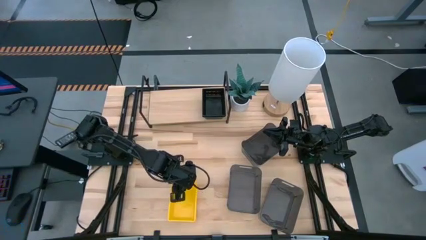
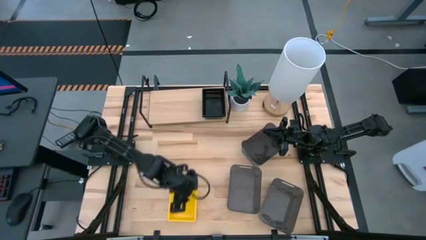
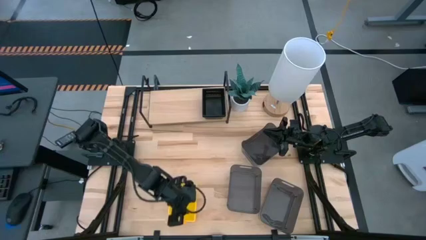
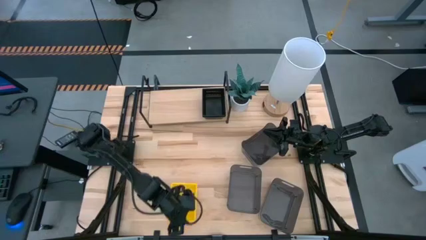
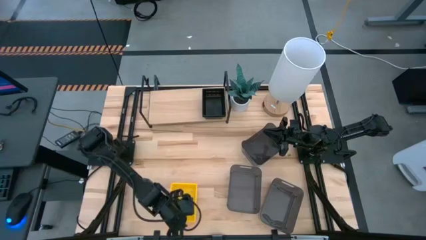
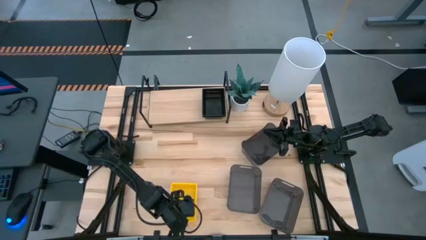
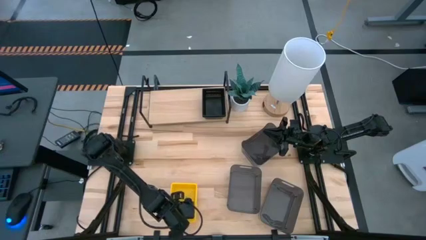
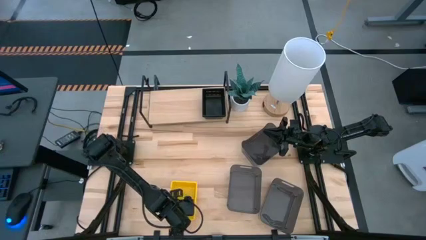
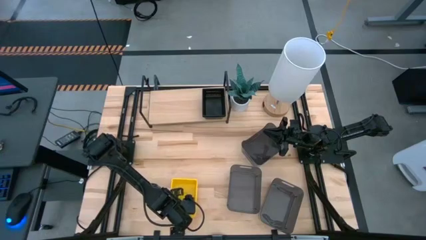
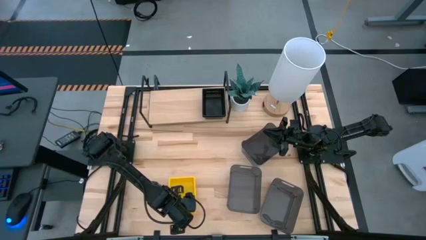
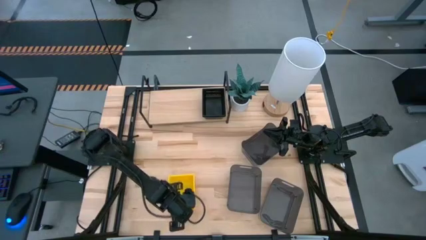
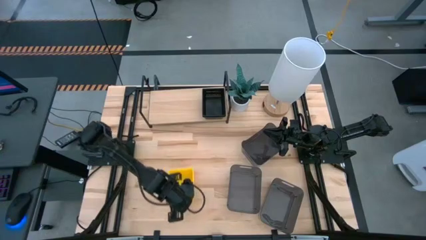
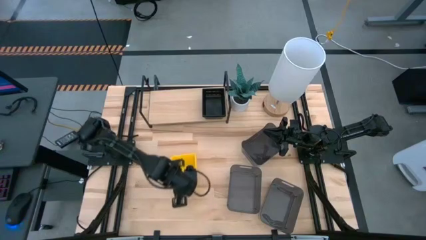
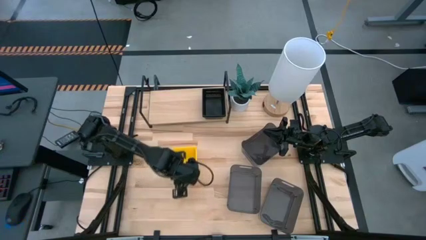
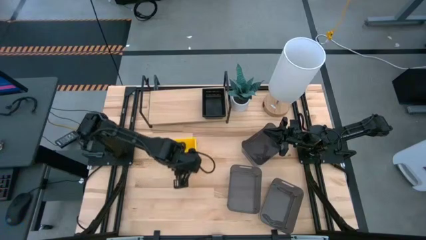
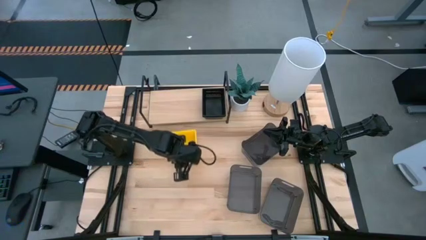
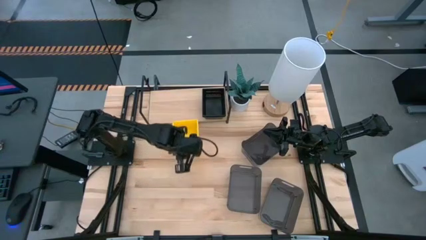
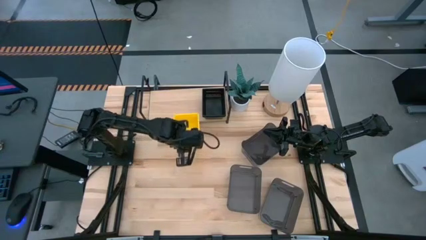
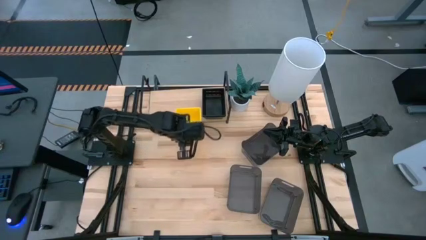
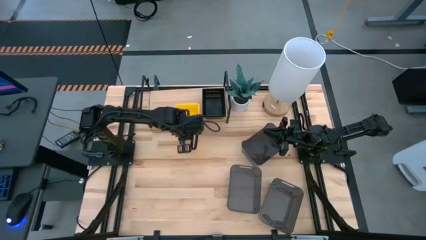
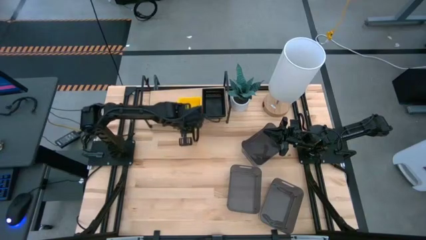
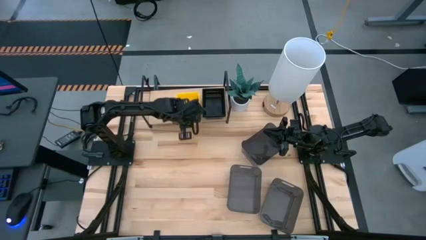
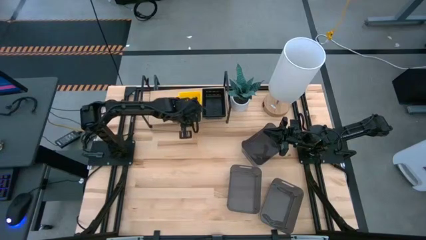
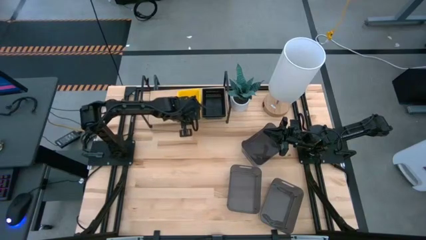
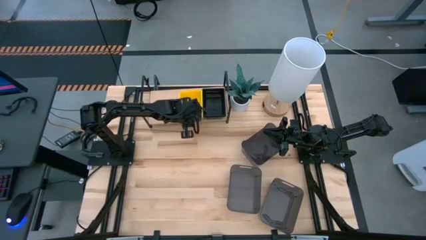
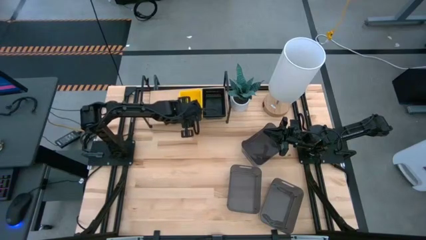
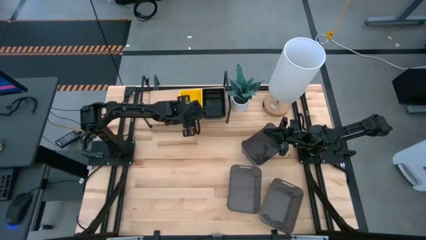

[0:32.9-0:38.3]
Task: Stack baskets on shelf by color
Put the stacked yellow bins on the shelf

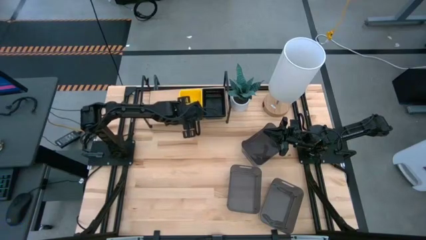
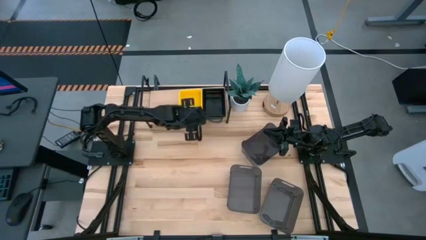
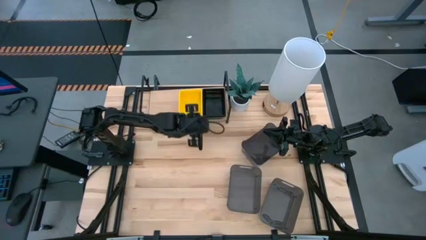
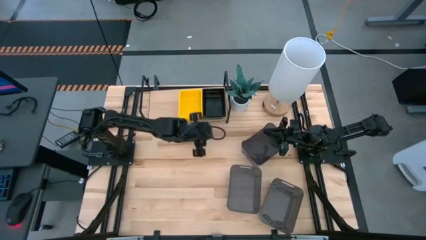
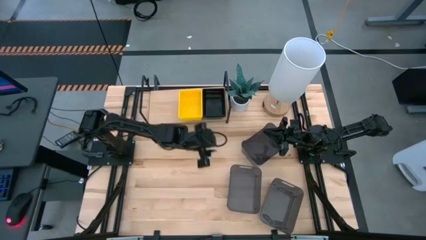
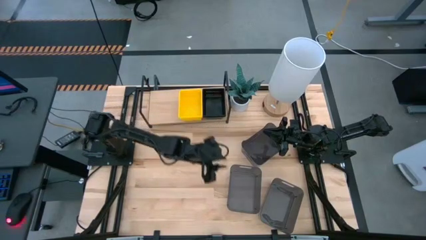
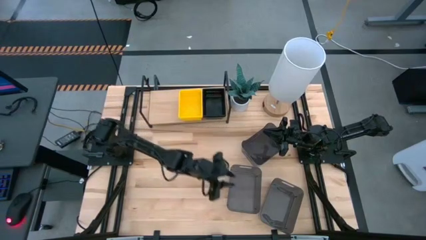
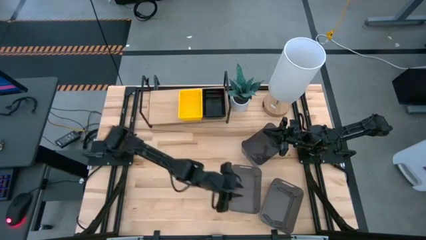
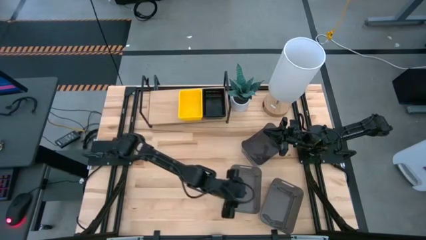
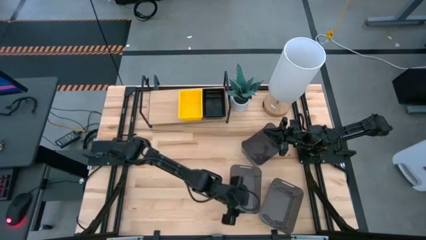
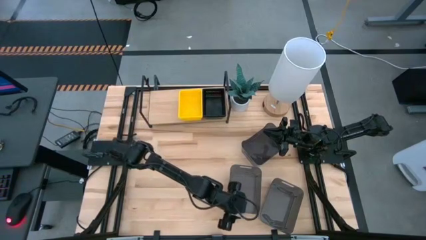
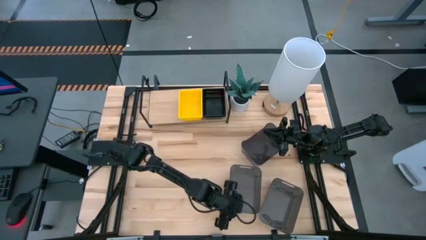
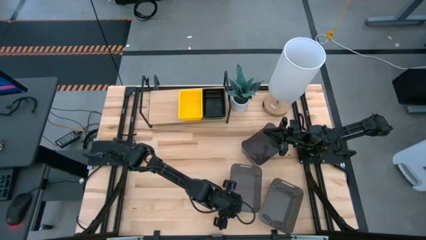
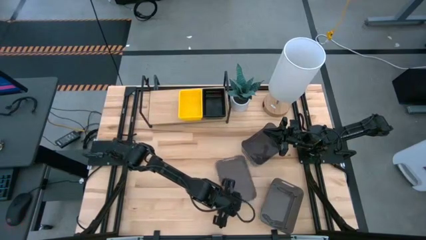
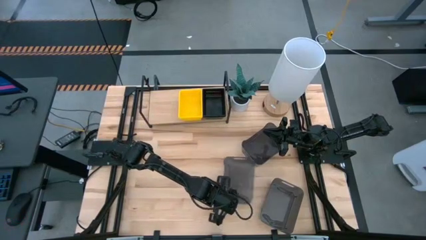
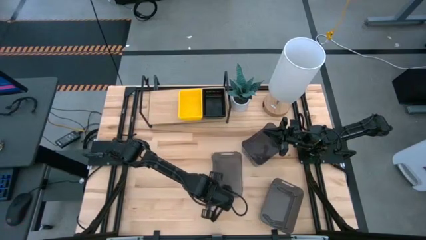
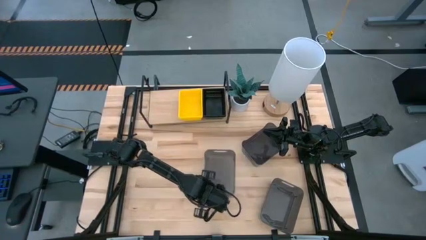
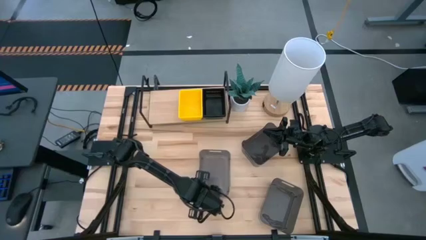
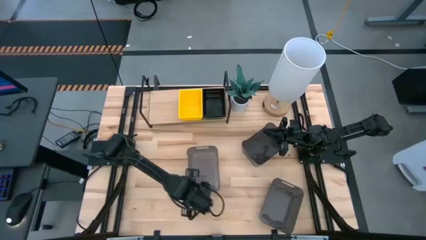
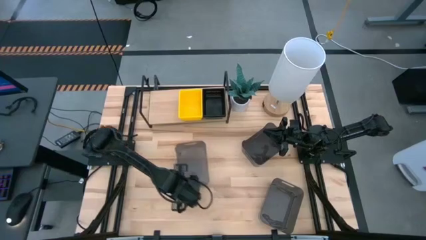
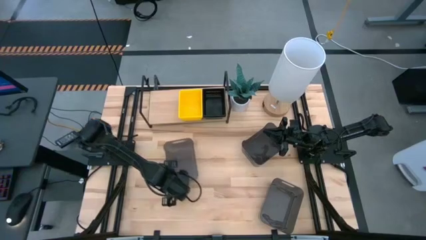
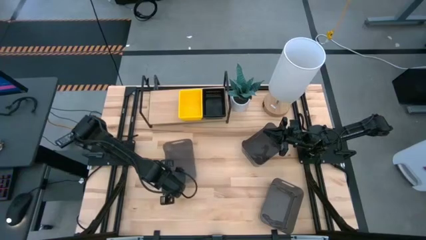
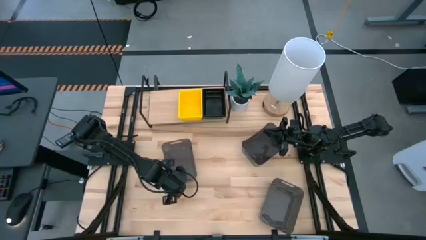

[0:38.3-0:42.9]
Move the middle transparent black bin to the center of the table

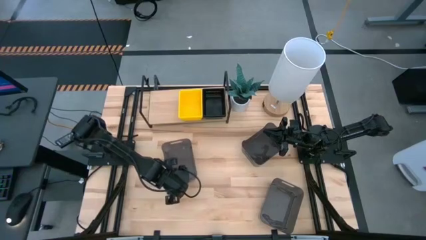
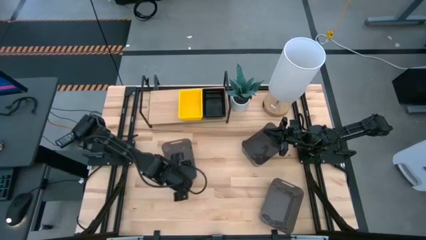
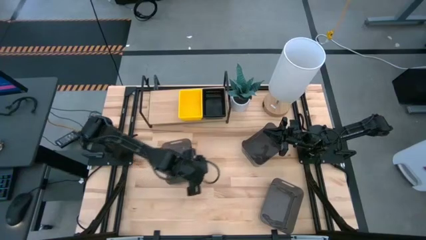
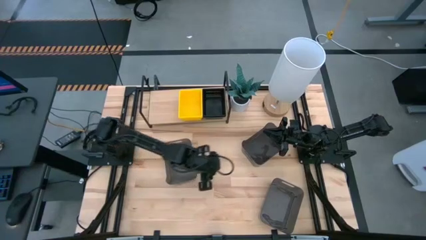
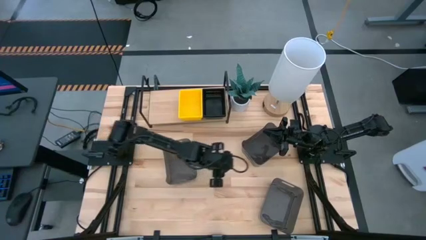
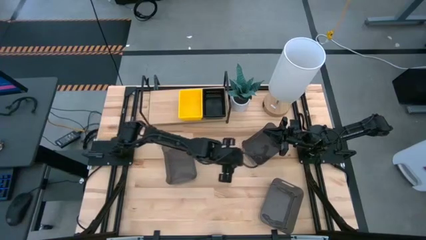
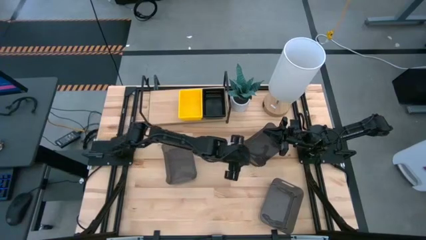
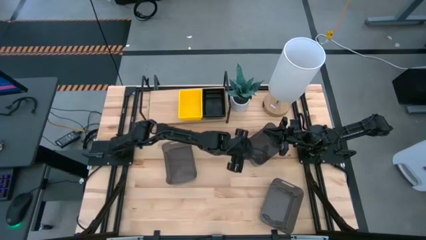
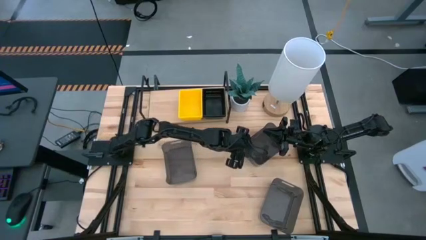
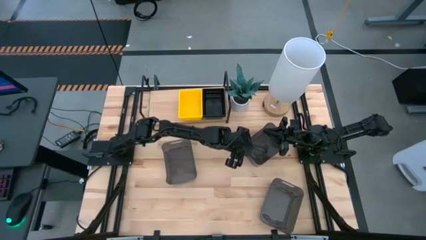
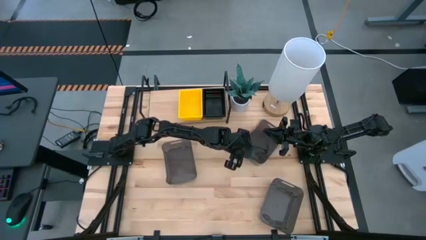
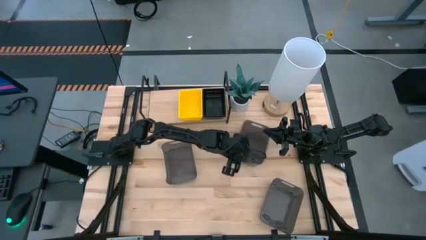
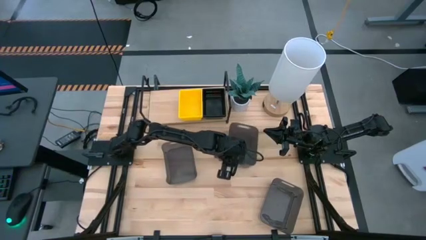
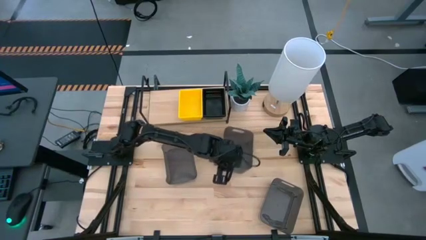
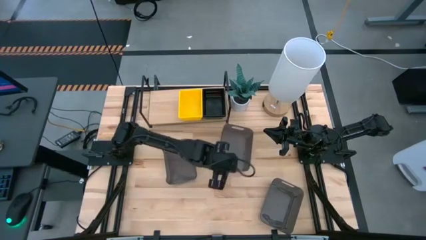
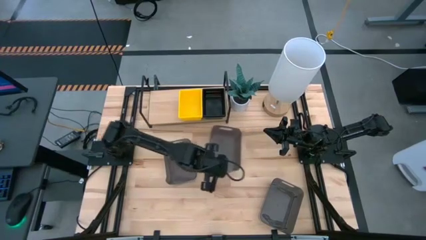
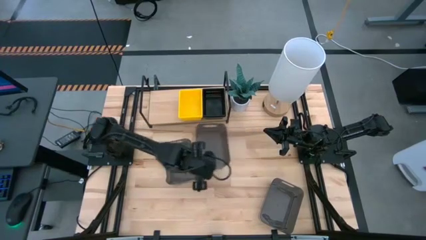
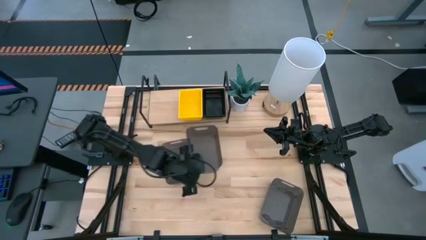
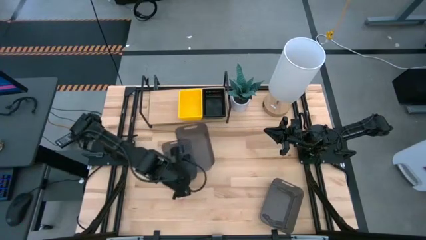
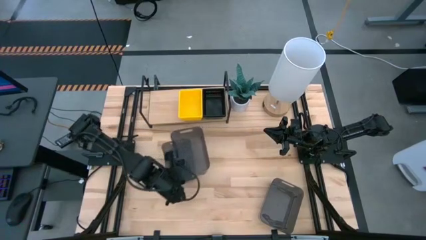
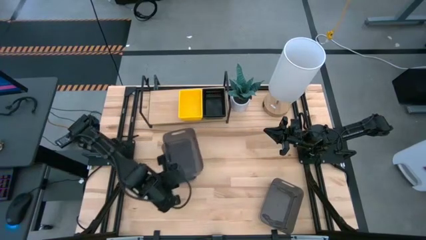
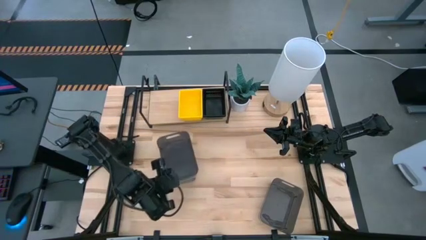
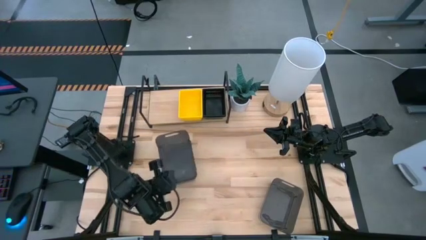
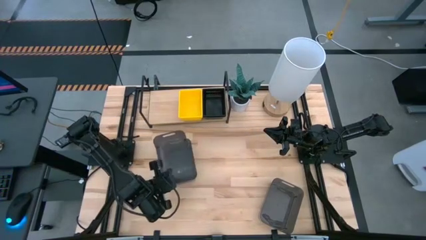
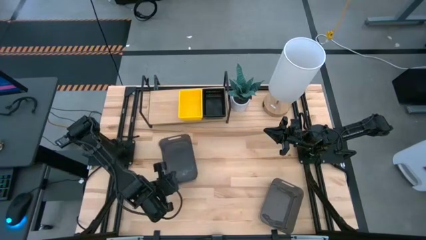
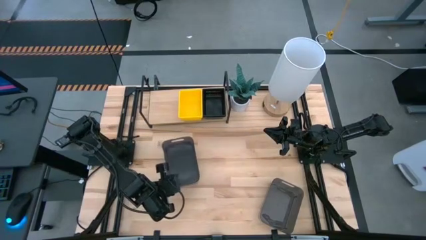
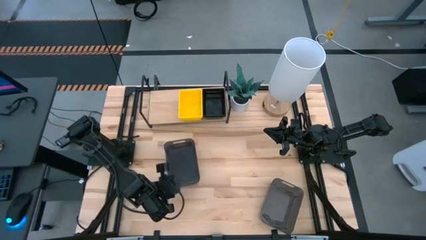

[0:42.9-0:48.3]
Stack the top right transparent black bin on the top left transparent black bin

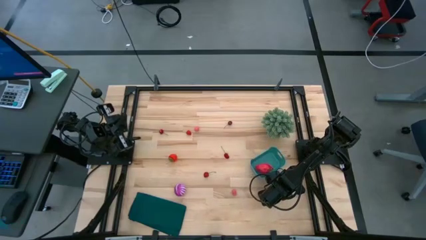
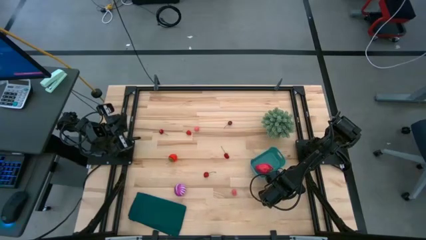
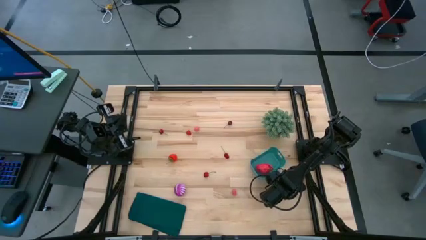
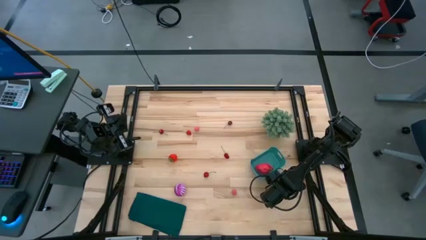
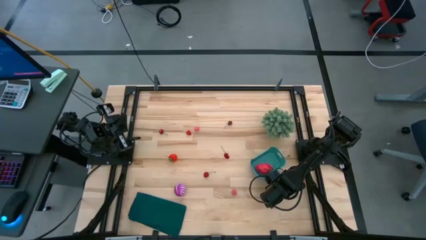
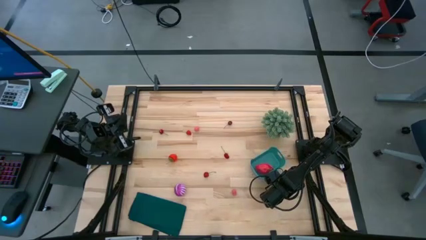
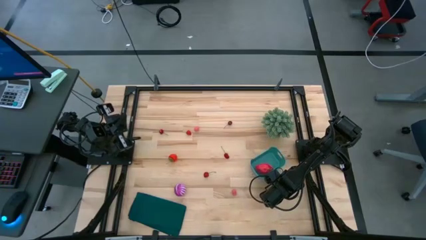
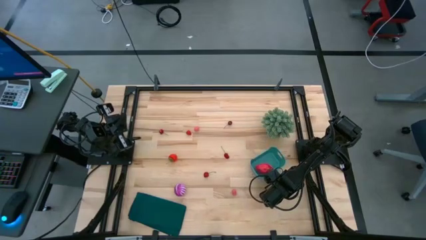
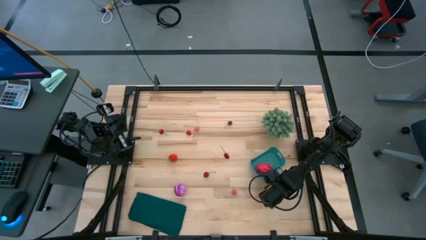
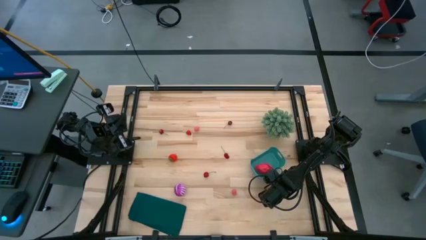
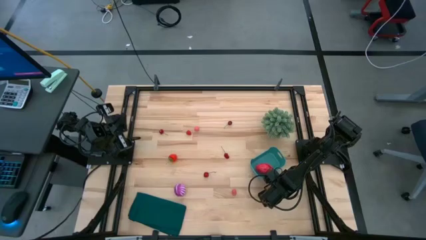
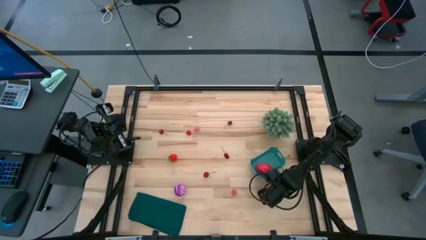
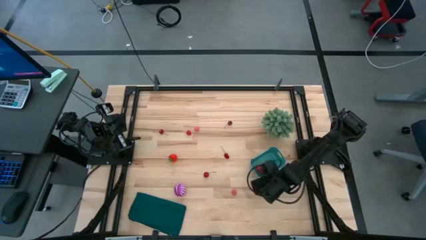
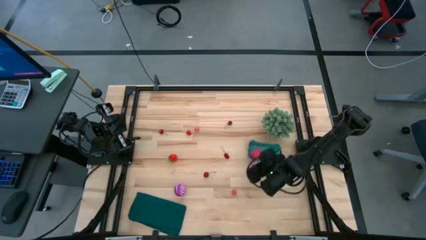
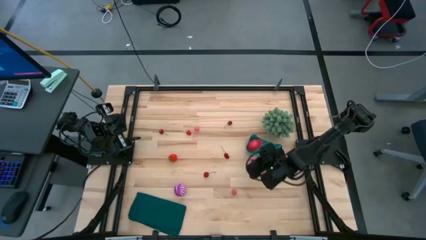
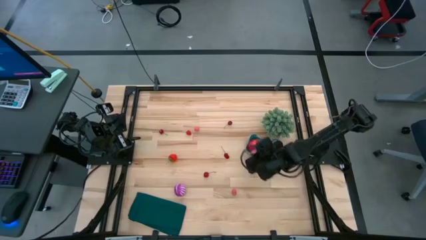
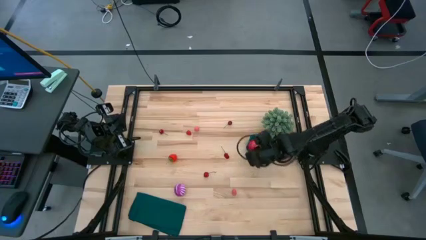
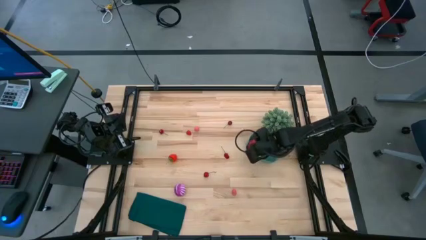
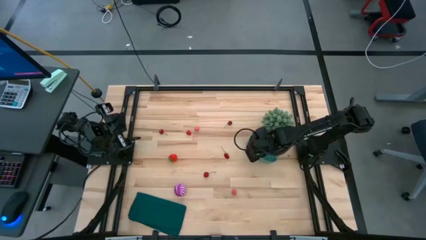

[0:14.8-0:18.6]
Task: Pick and placing Produce into tupperware
Put the peach into the green bin
